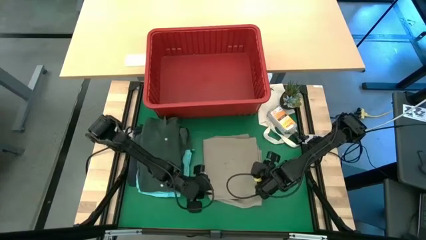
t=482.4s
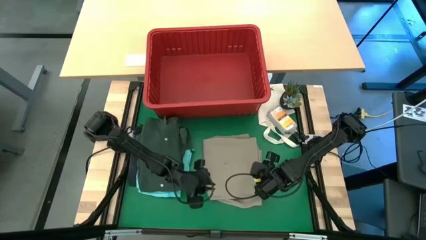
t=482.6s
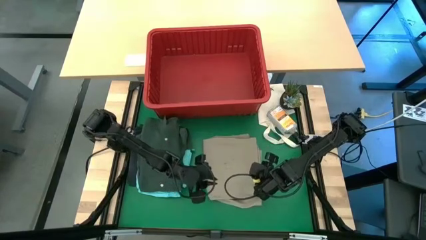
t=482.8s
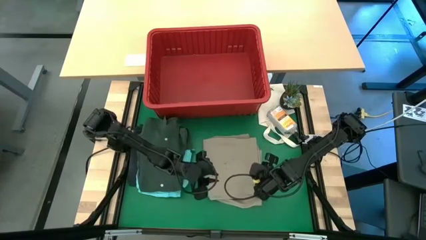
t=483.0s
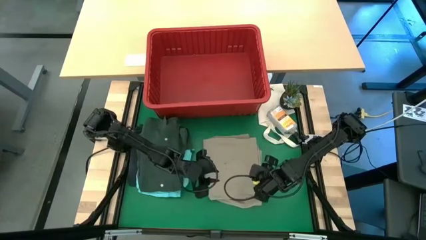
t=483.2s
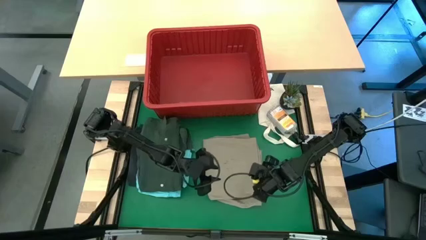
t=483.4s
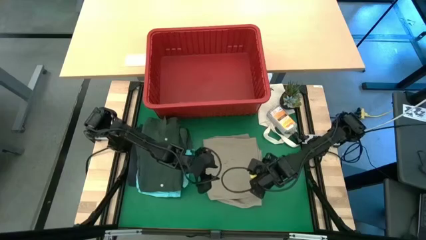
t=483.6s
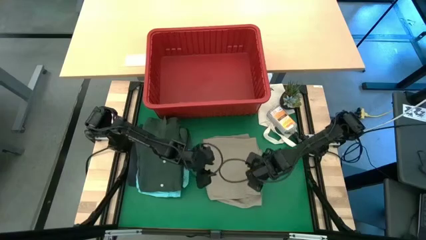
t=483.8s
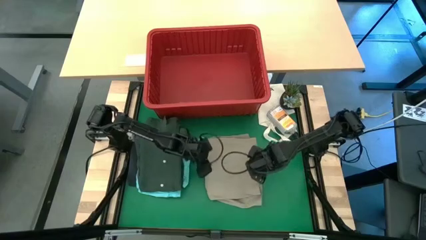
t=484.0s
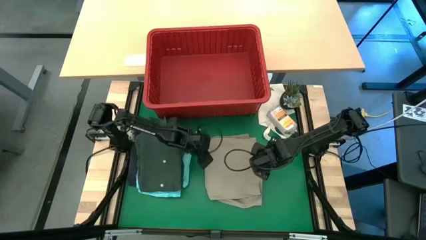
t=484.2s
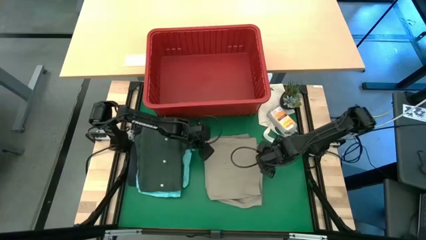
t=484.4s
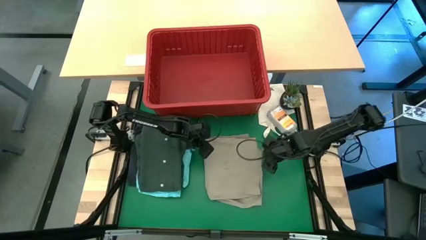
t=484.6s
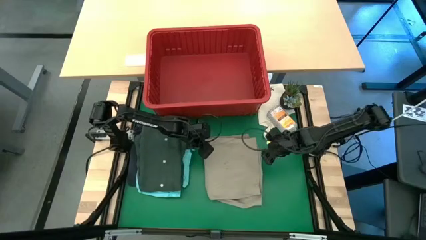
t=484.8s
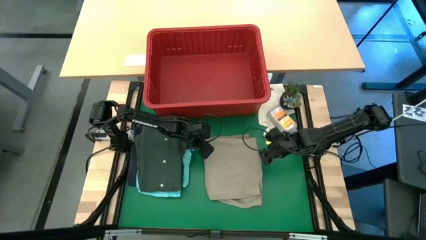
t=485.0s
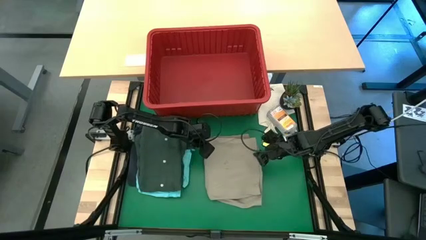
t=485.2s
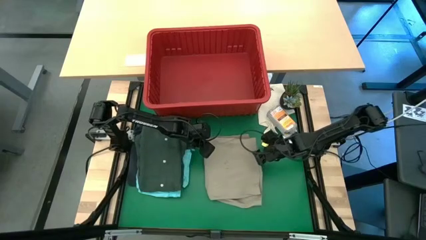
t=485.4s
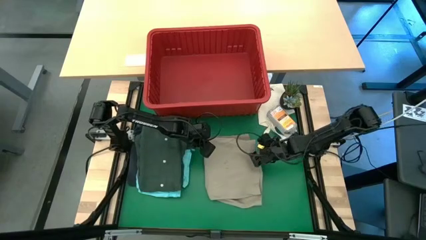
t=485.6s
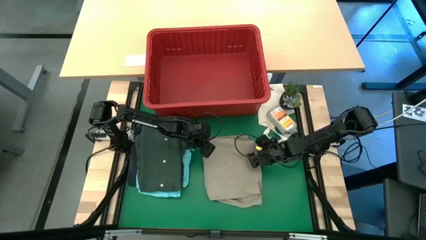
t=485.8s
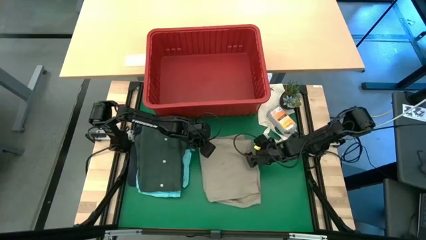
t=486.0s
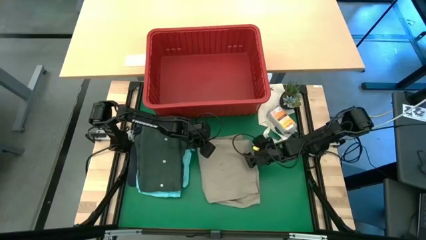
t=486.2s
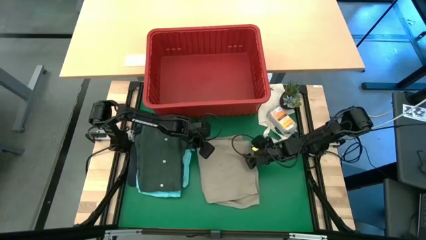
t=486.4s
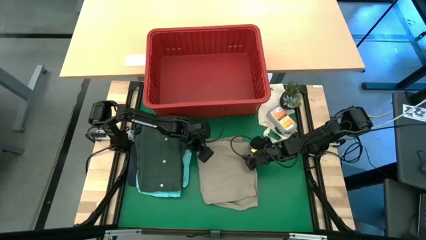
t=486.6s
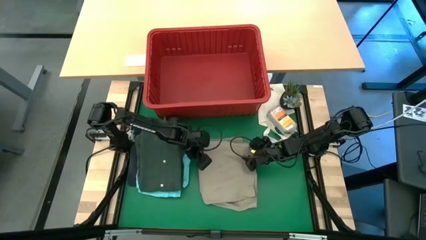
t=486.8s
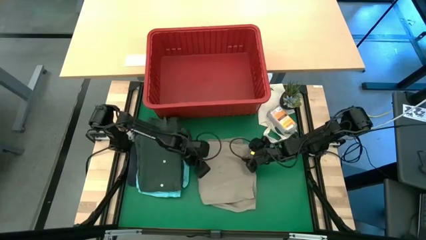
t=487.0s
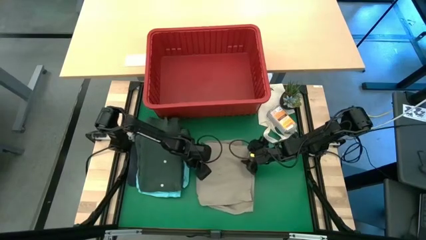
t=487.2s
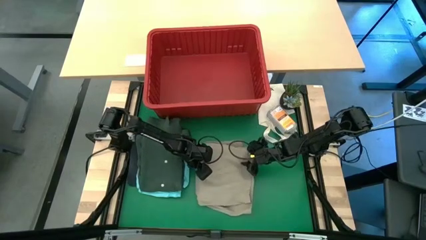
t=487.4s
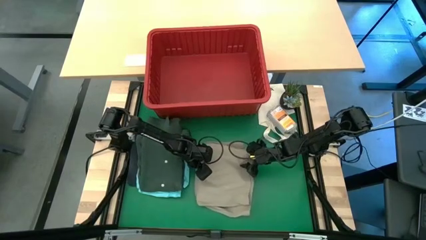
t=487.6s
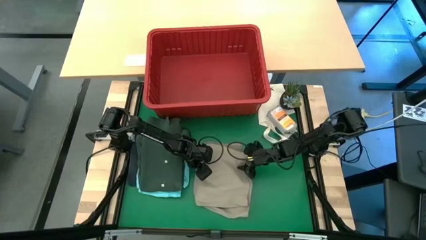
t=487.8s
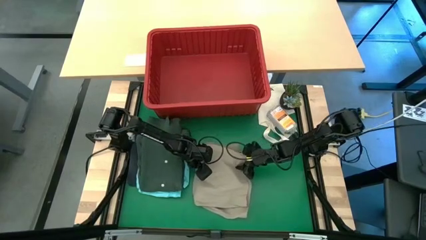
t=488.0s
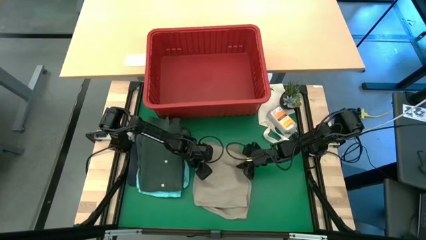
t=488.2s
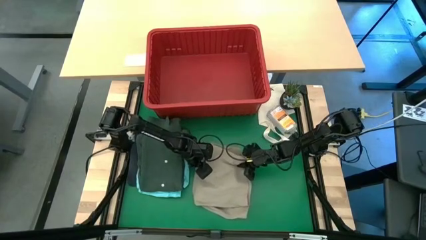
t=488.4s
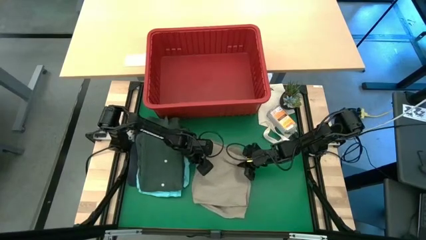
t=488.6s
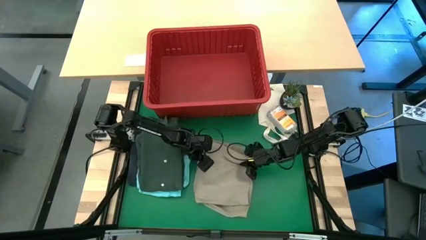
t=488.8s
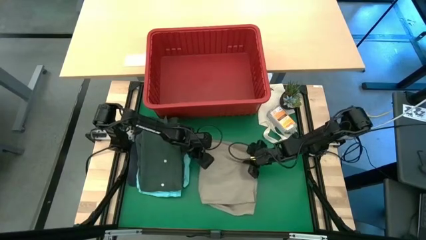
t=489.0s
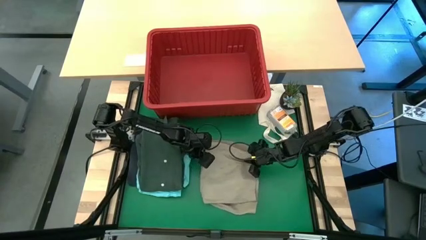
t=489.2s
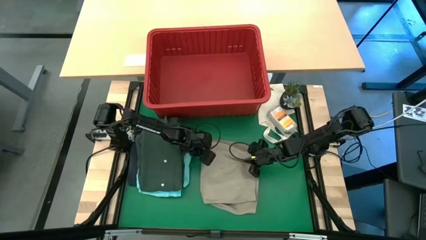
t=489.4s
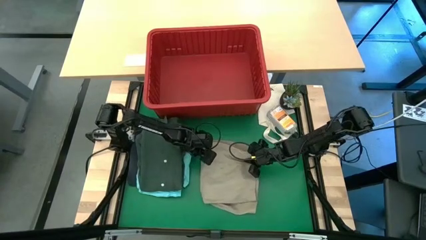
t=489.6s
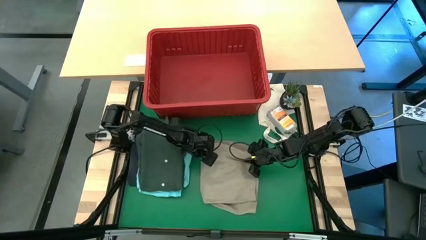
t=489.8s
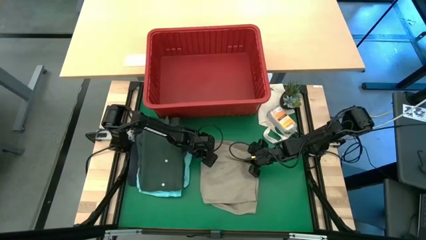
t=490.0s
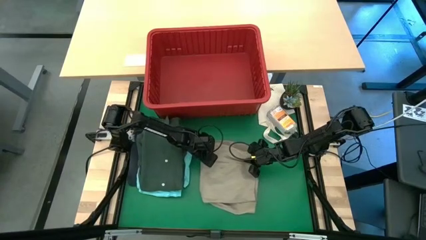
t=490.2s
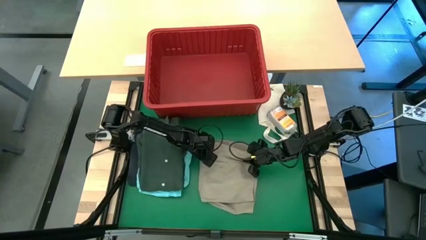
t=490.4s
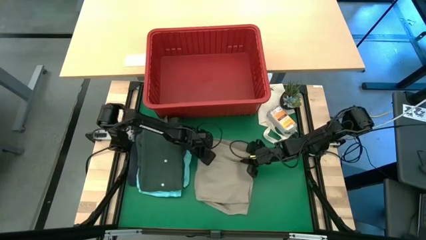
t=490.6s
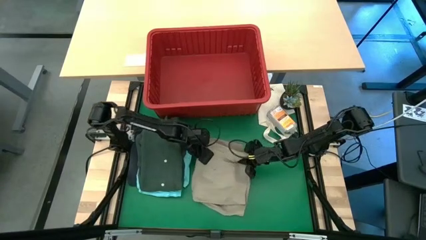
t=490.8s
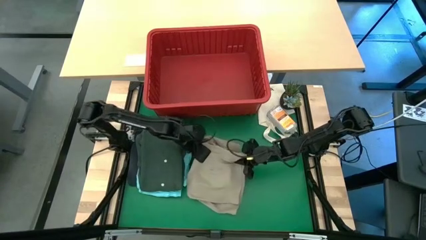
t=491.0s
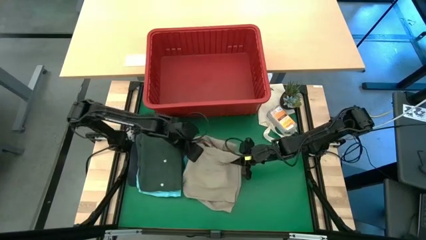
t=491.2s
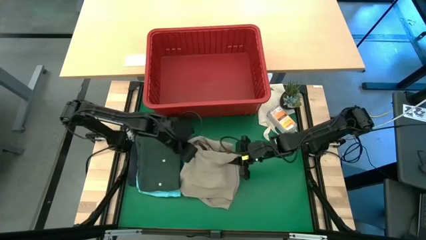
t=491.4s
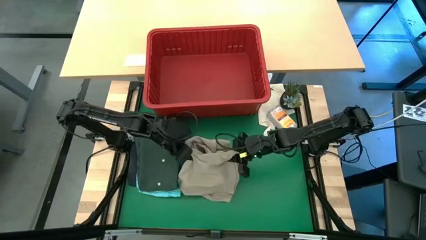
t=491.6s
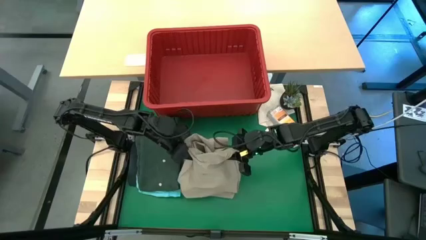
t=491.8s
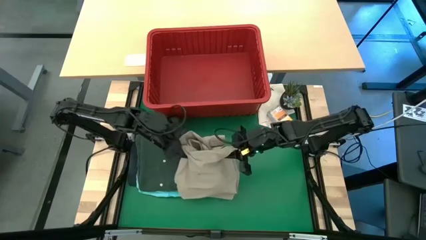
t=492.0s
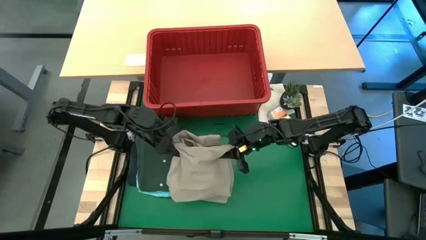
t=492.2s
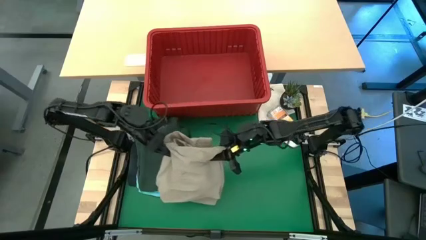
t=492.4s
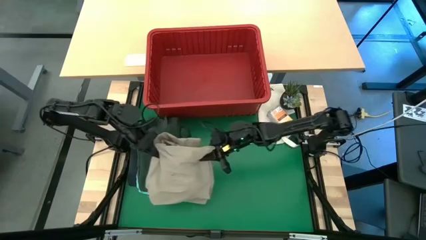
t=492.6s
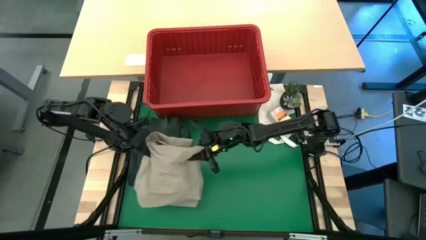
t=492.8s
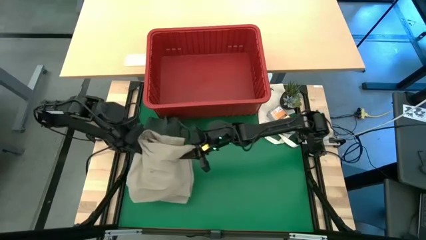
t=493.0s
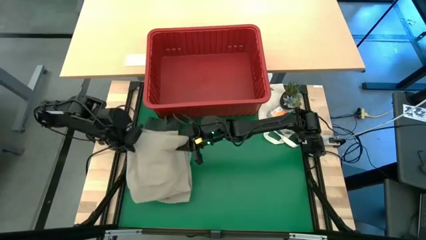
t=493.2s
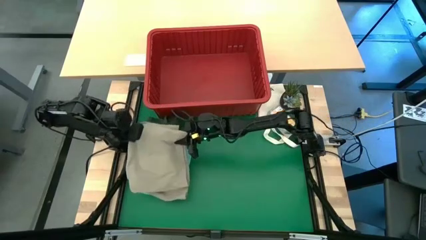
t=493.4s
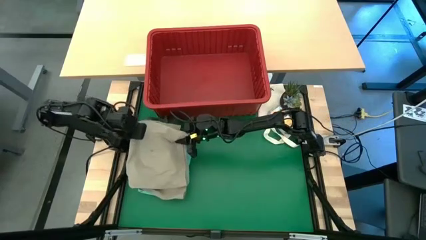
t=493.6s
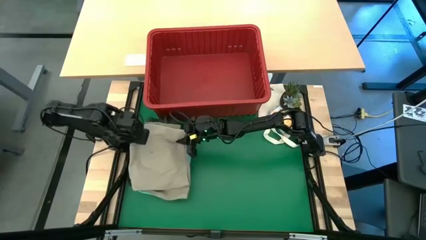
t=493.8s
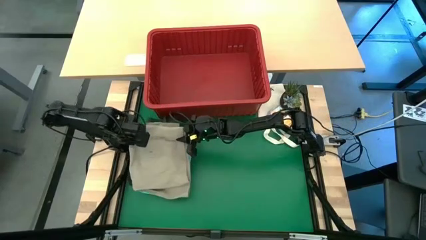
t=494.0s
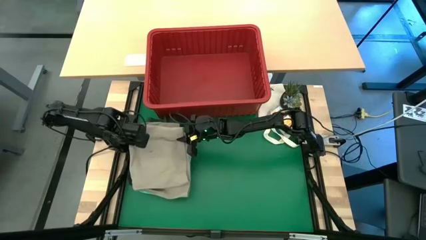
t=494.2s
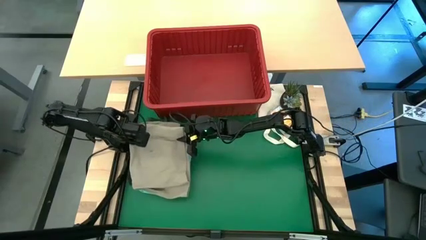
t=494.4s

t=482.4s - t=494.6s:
Task: Fold Laundry from Bin
Stack the folded brown shorts on top of the folded green polo shirt

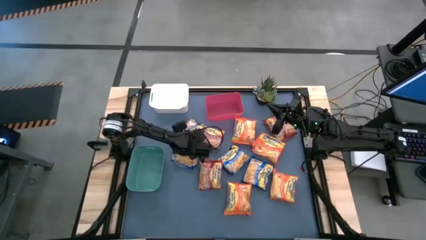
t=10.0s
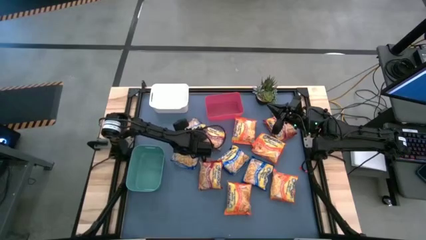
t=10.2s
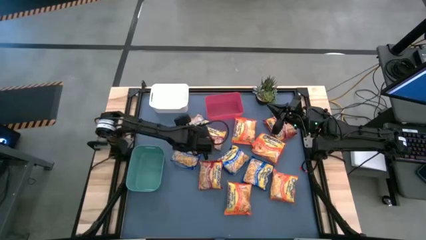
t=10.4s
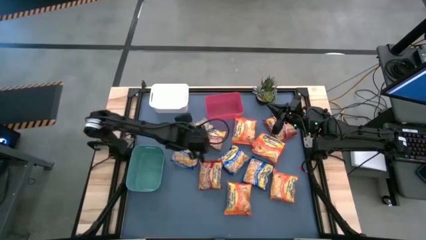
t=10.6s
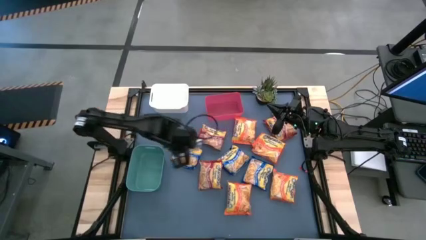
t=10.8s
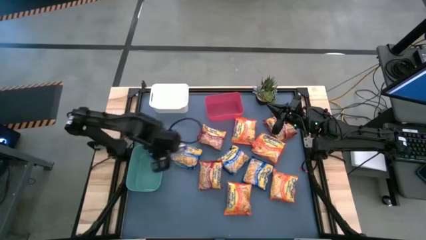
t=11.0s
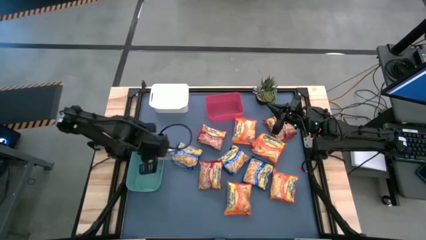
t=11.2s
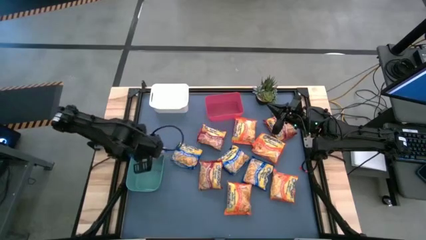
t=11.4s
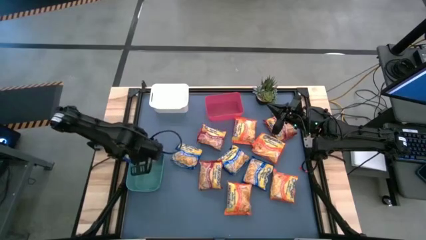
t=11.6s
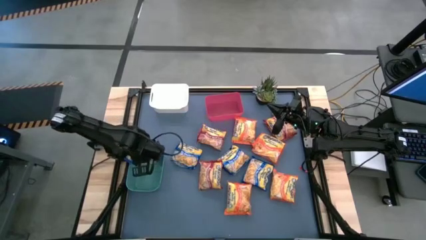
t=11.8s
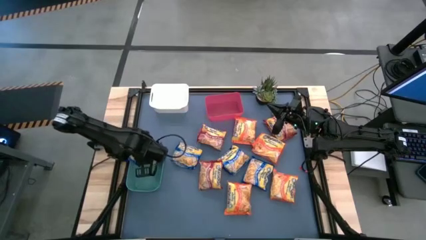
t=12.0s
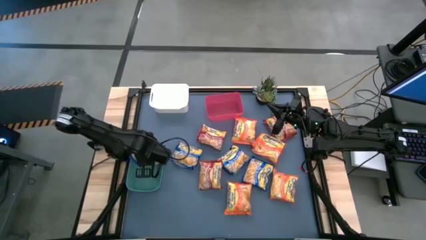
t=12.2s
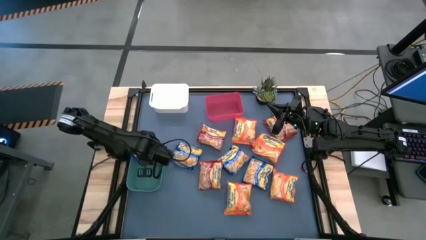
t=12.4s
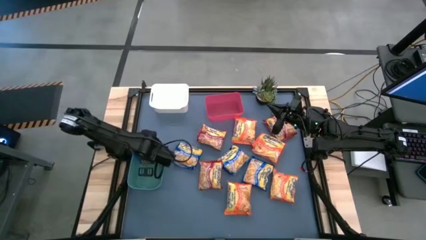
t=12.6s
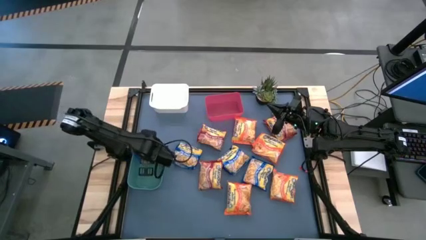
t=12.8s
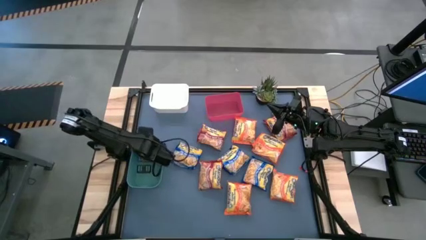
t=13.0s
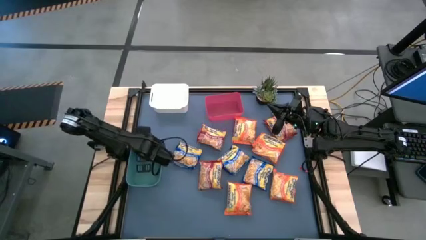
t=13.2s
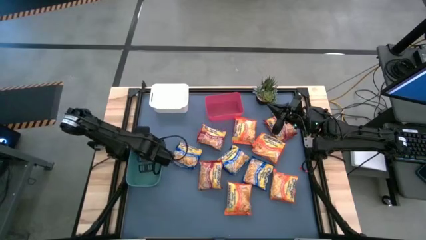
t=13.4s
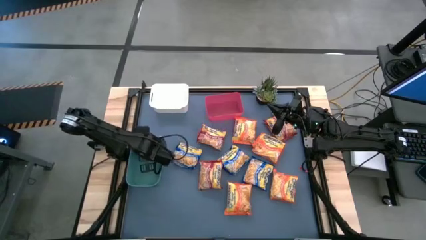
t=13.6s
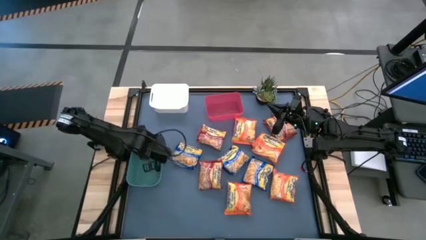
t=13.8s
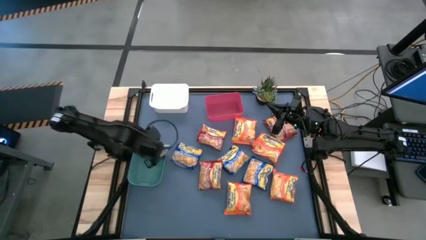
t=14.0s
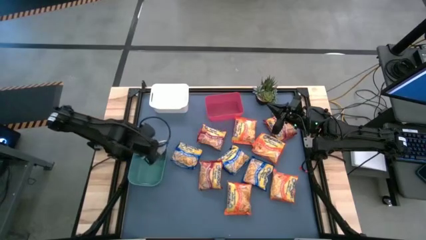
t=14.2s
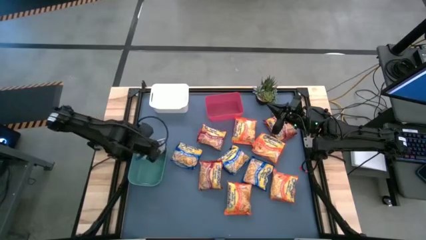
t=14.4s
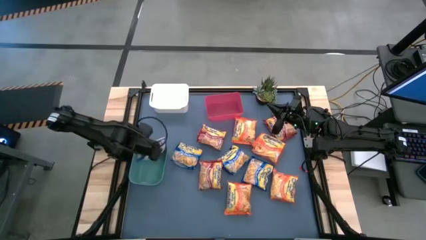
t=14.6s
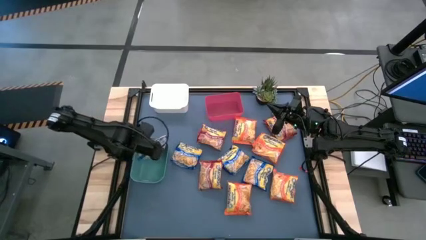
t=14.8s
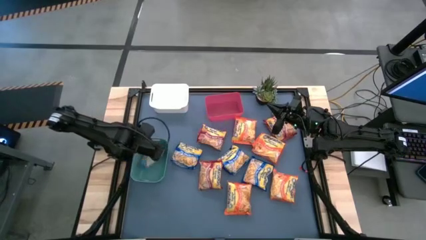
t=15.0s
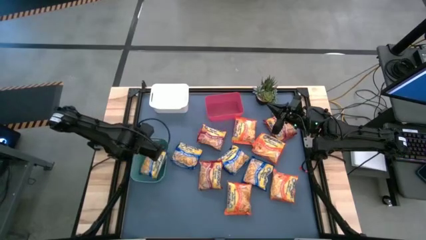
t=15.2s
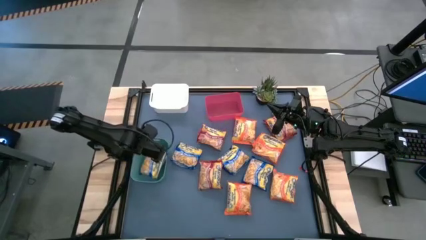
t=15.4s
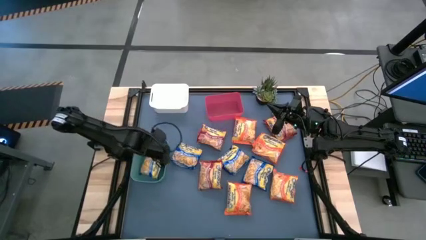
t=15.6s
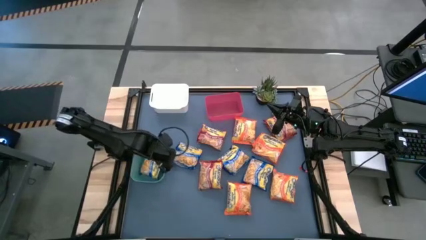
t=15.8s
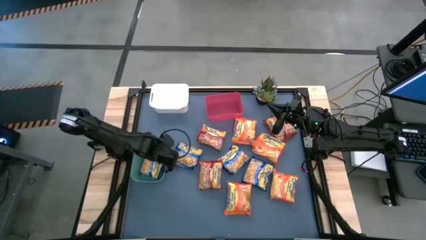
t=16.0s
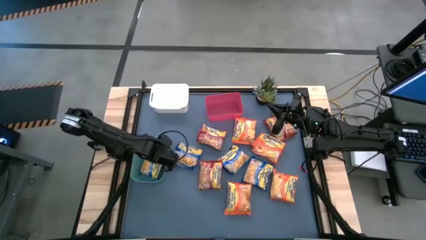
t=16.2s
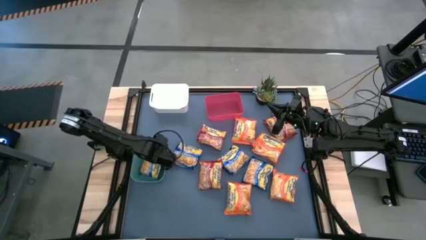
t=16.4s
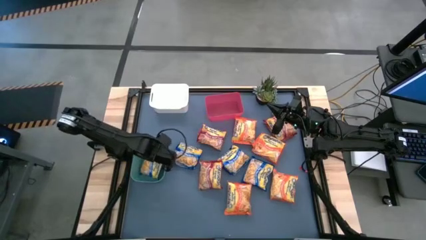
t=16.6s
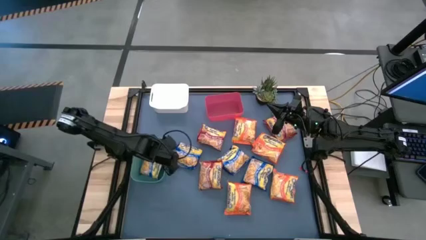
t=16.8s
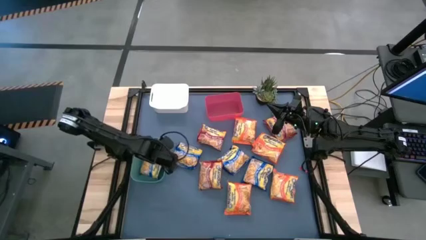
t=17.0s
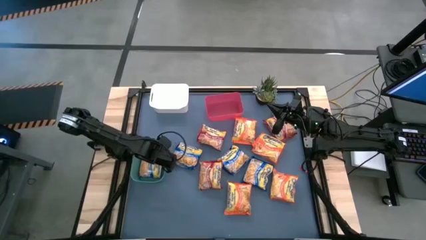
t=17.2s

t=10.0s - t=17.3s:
Task: Sort Maruchan noodles
Put the blue noodle pack into the green bin
